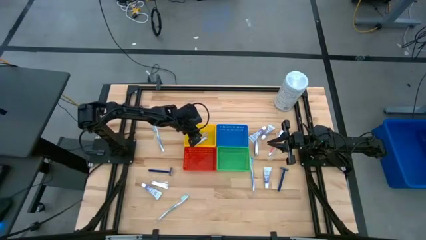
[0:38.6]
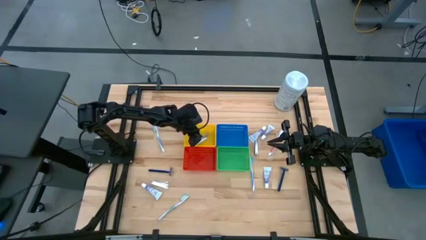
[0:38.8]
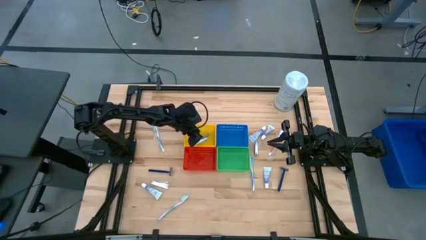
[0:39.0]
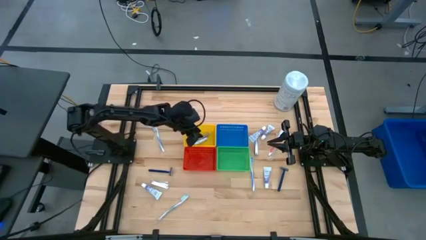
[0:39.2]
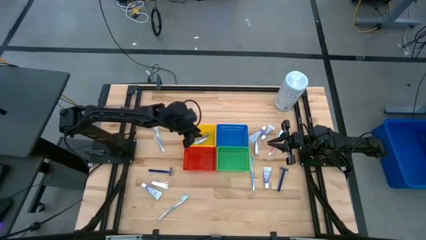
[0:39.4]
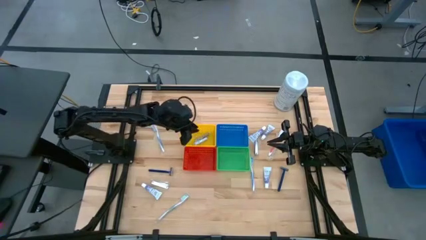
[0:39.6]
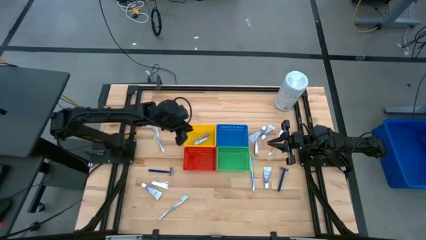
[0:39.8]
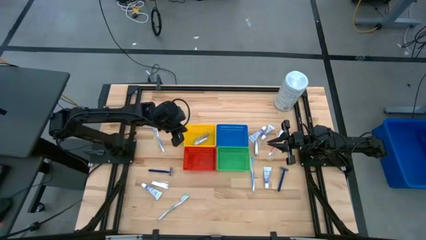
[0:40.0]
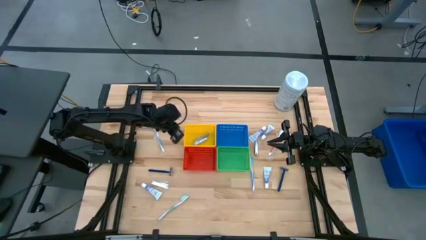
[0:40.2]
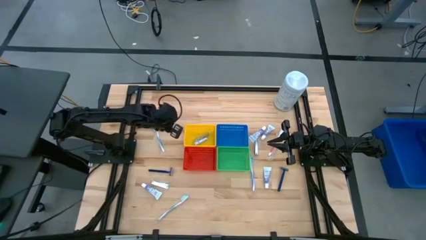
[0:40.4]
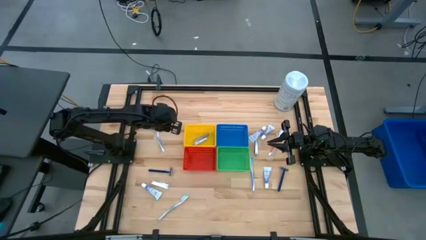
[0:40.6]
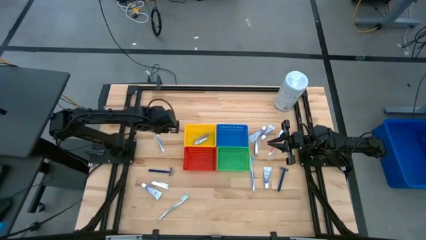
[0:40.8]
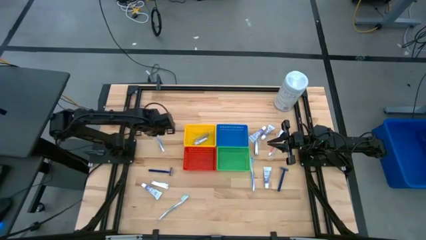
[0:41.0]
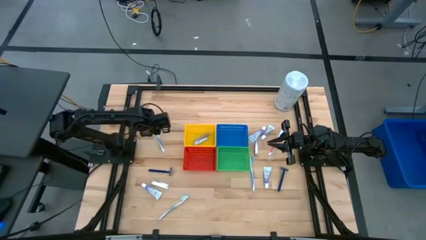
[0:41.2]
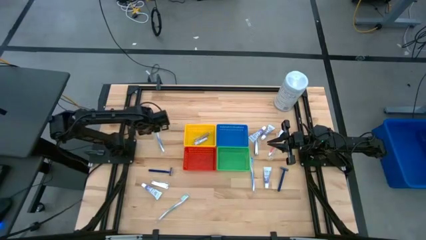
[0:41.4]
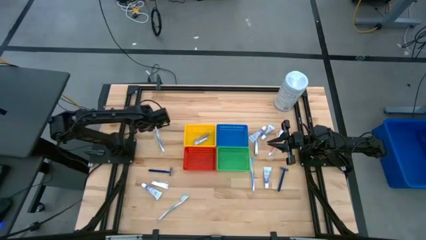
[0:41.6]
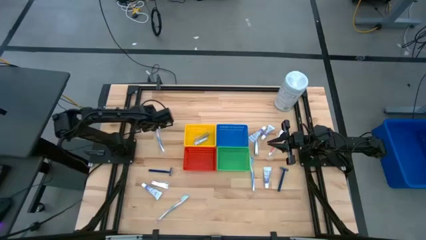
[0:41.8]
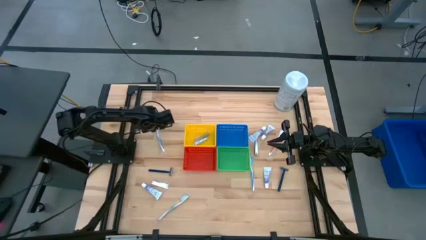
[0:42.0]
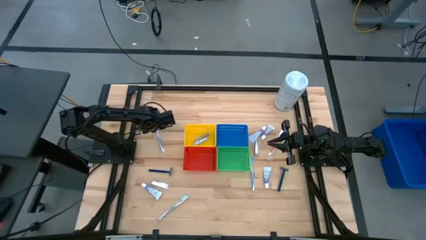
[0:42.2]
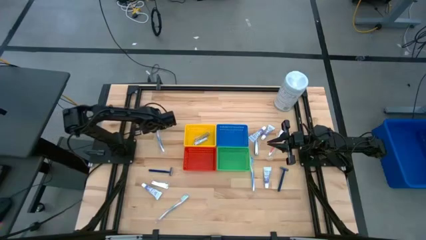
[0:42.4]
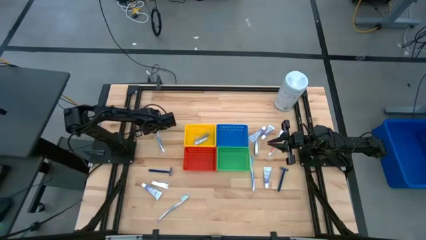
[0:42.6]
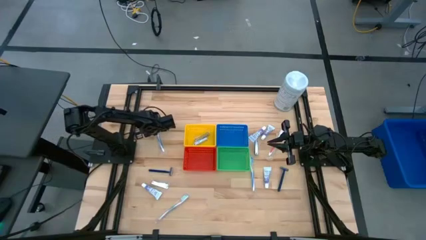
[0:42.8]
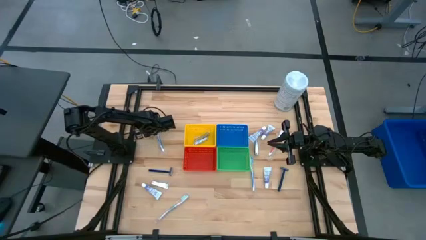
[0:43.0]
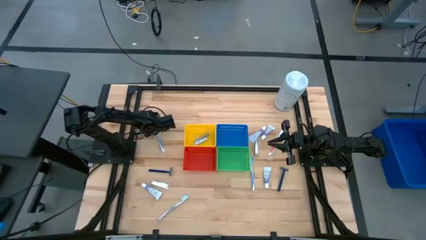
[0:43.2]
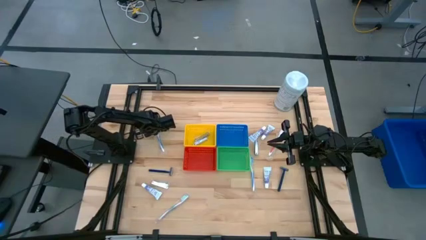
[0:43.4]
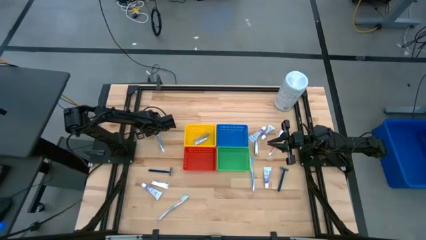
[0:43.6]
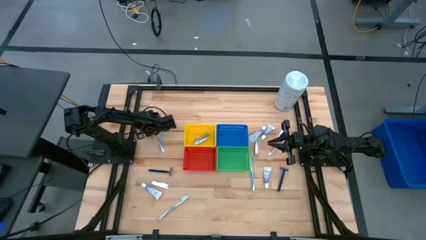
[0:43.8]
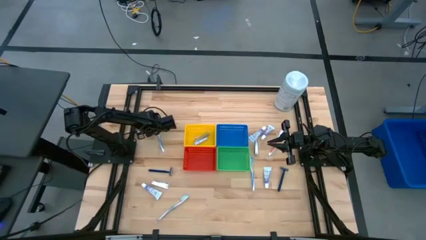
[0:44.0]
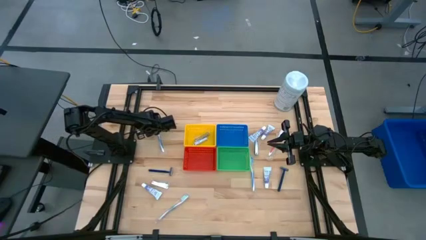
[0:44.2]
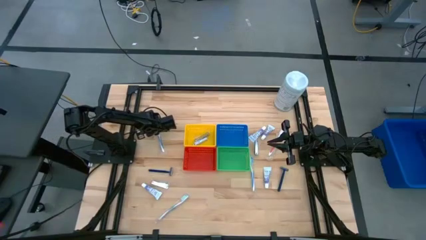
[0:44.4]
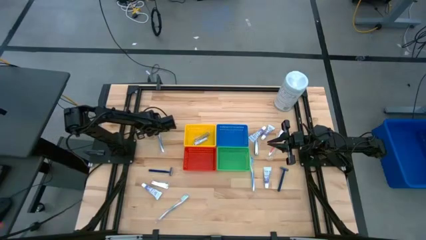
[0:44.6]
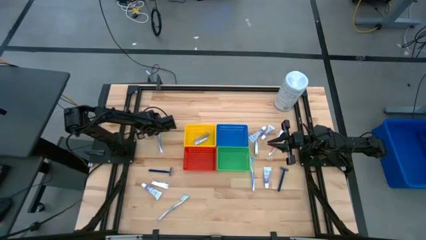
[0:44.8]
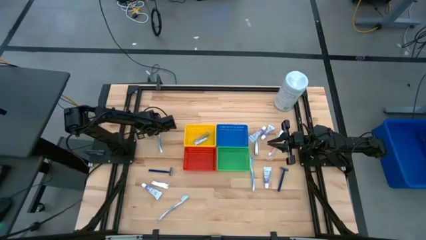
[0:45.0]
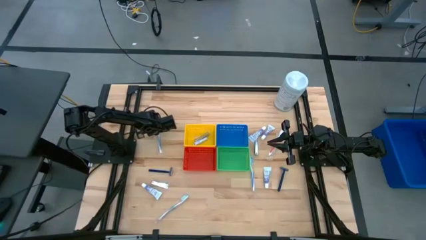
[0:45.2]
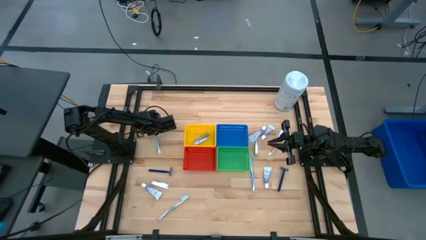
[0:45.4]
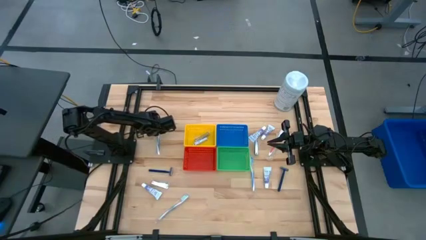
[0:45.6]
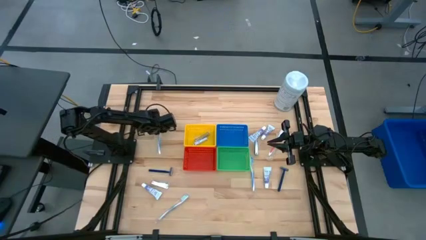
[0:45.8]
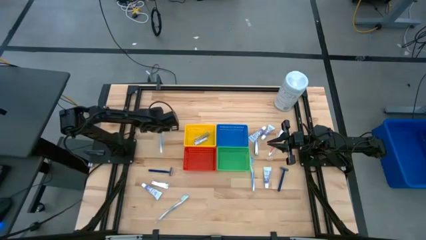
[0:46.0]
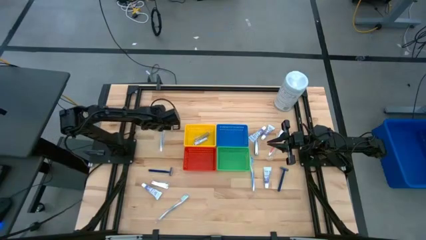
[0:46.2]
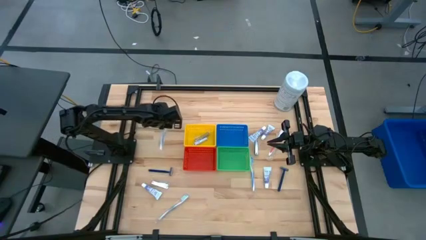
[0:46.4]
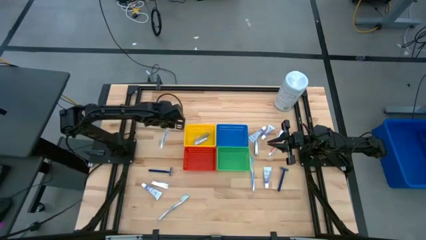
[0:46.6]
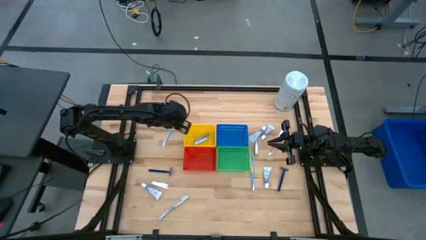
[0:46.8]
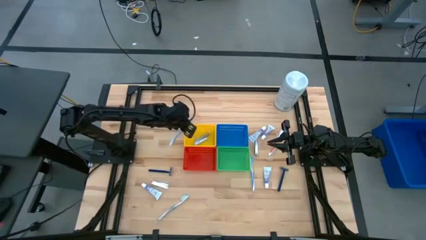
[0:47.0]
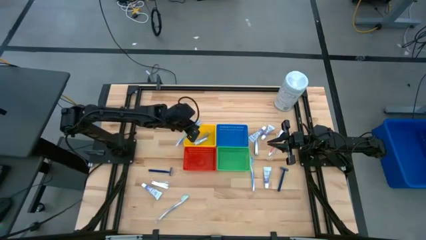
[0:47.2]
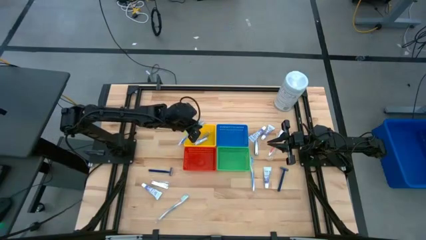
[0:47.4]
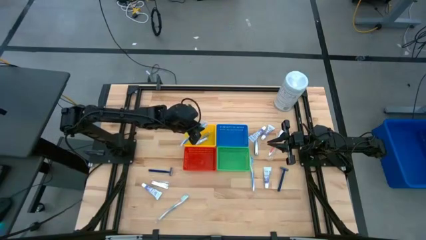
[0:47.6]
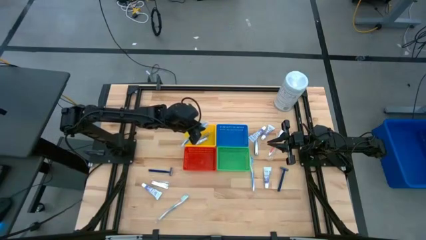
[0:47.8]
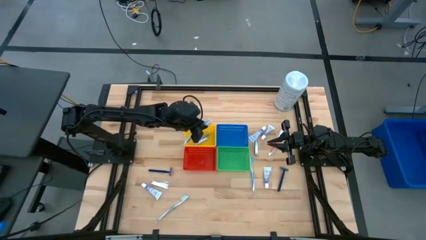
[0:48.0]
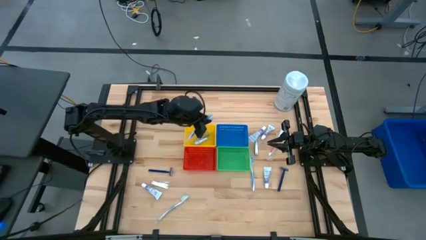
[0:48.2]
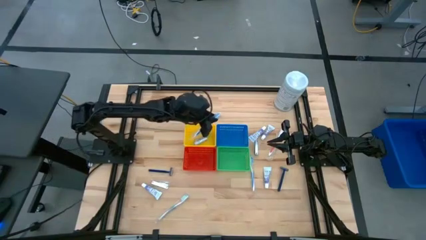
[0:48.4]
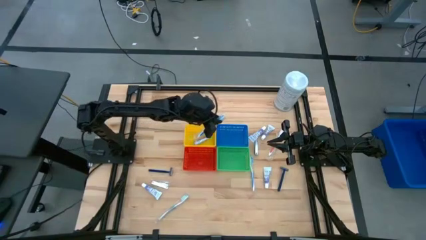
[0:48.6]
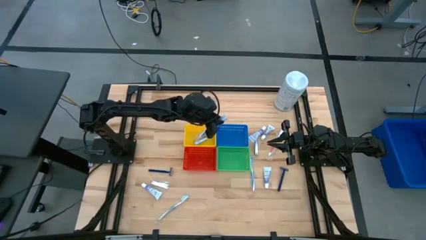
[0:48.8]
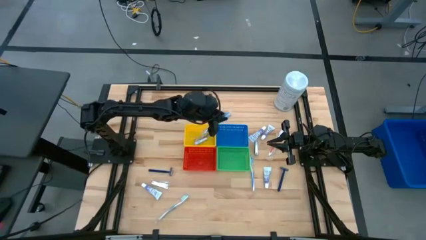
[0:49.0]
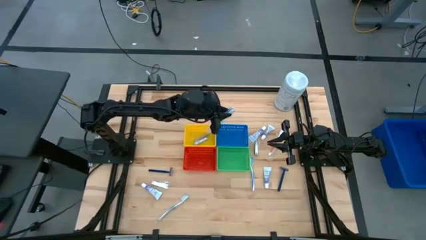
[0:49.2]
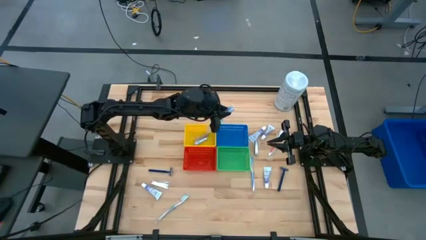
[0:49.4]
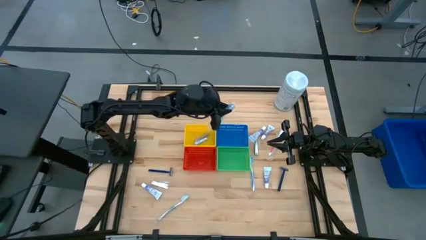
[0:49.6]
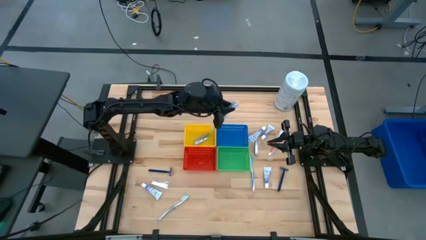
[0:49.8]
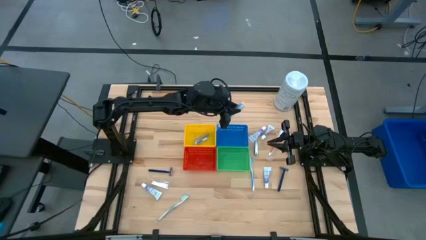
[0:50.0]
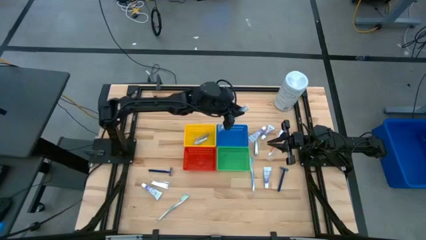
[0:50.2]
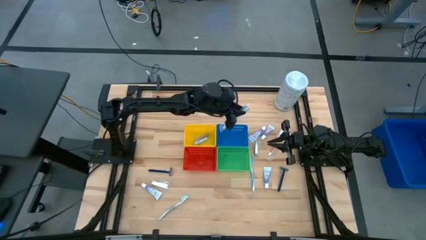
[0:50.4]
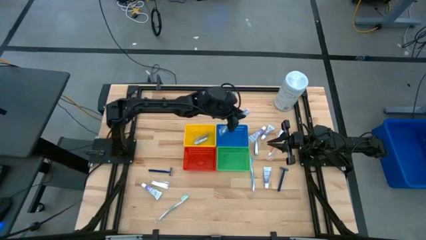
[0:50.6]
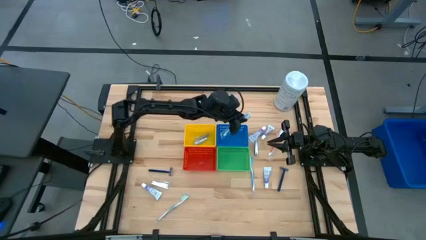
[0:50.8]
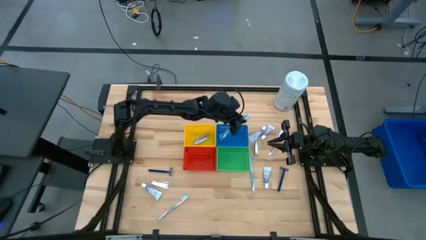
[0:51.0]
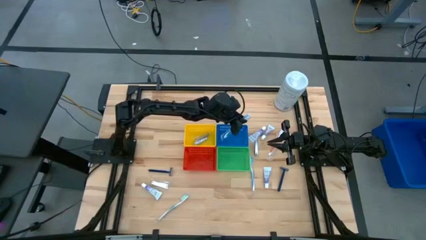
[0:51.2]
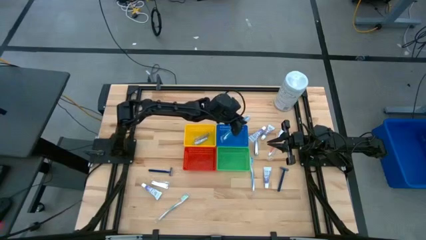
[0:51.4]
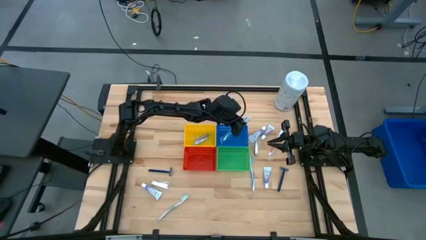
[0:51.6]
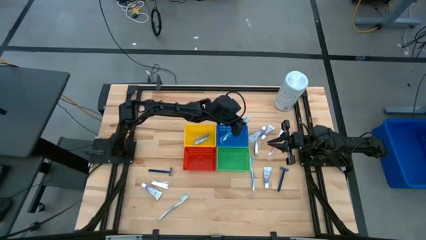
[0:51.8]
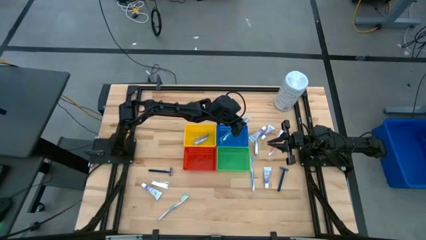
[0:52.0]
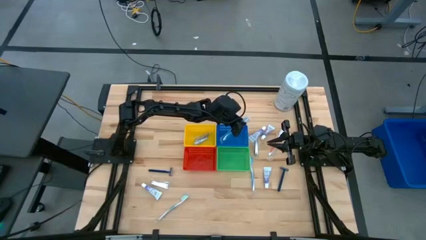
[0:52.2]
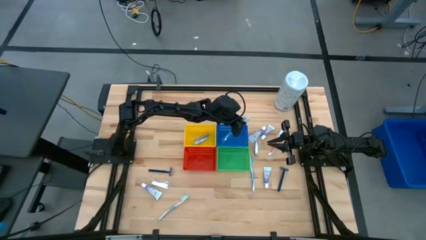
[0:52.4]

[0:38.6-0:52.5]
Task: Pick & Place Travel size toiletries
Put the left blue toothbrush into the blue bin
